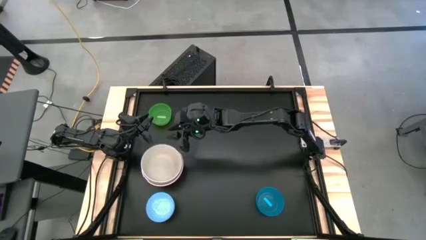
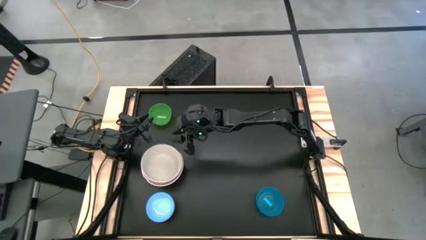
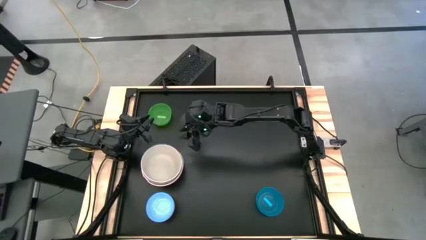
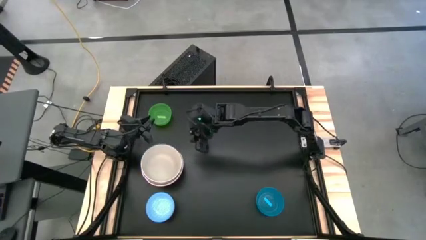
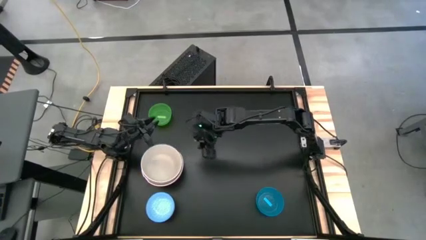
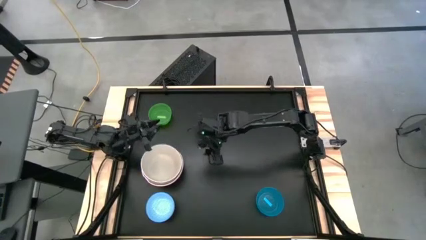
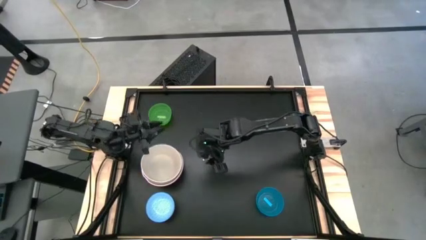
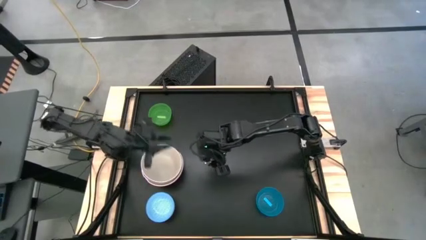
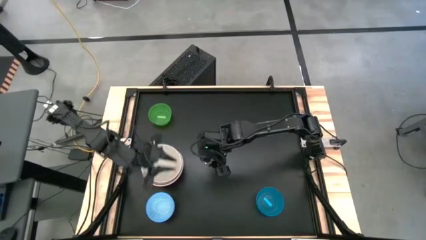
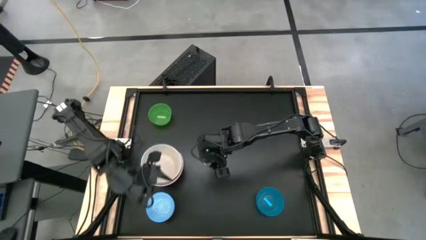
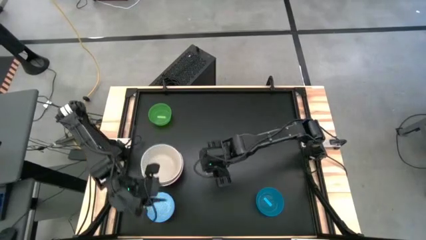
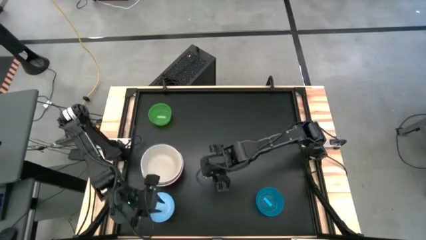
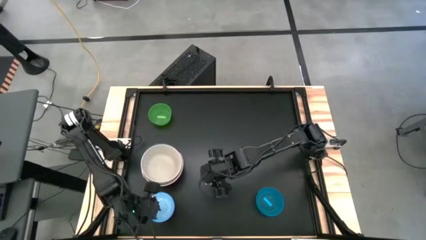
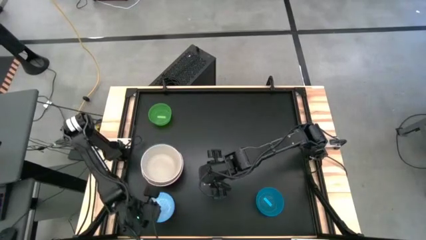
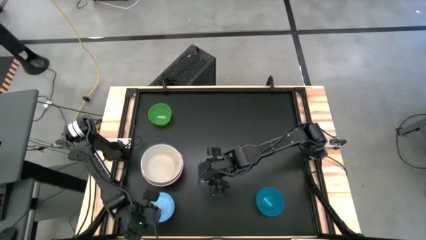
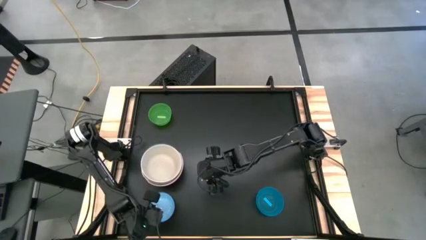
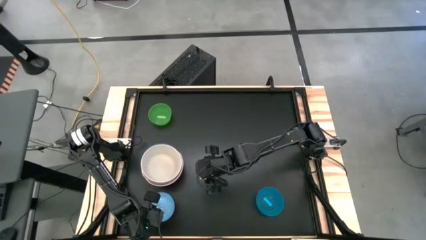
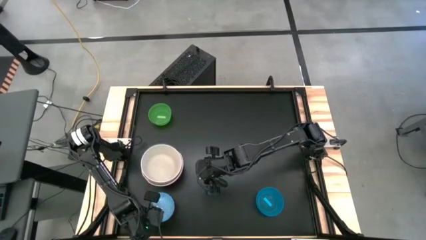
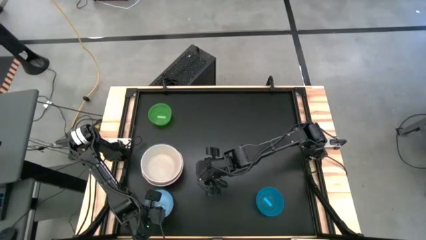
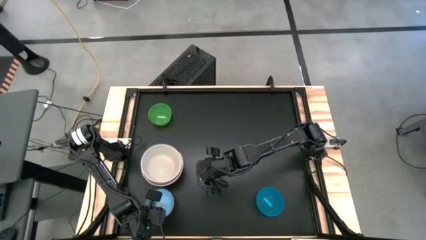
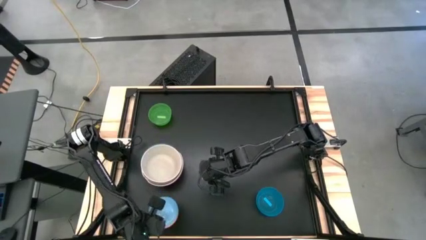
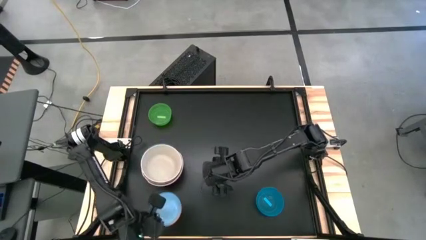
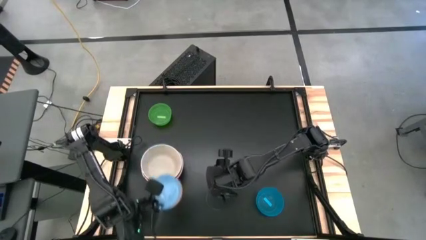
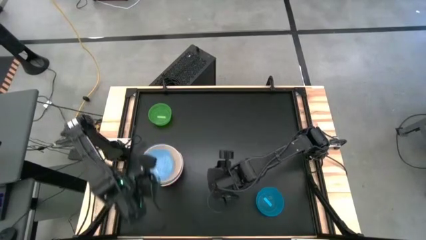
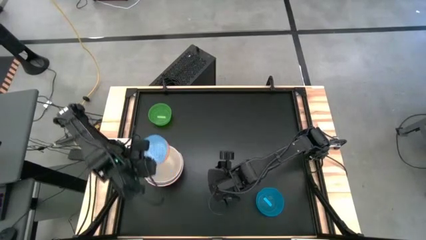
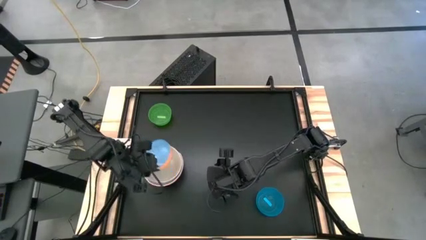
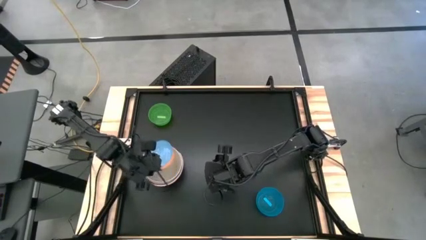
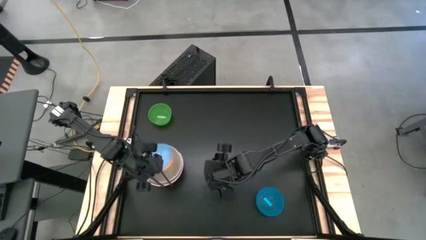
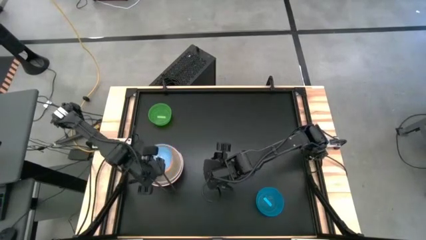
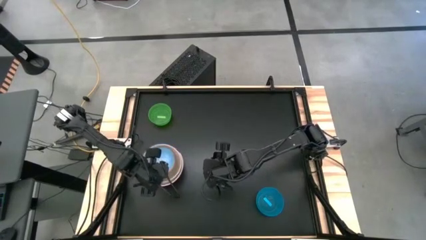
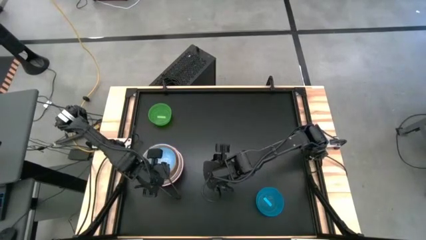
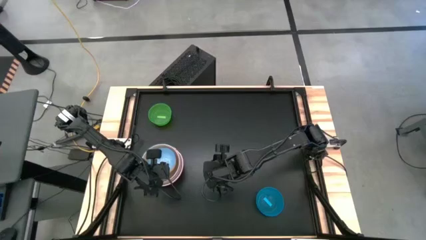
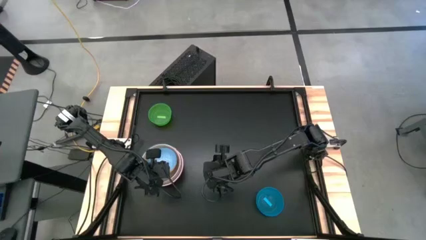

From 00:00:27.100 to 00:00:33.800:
Stack the blue patterned on top of the gray bowl

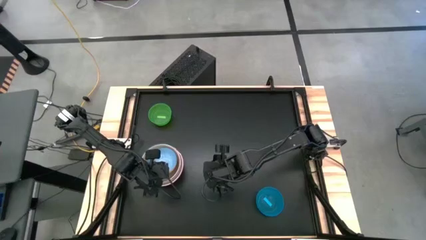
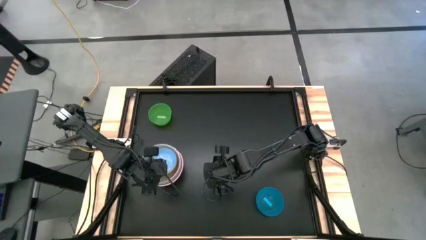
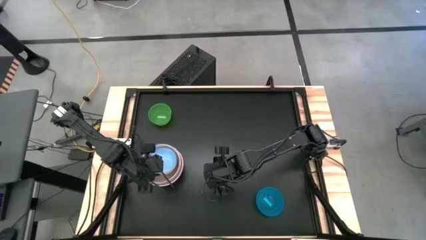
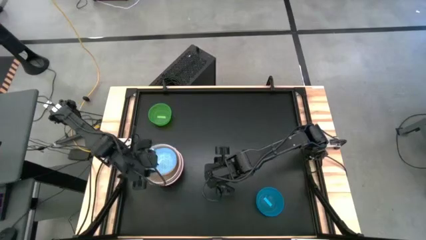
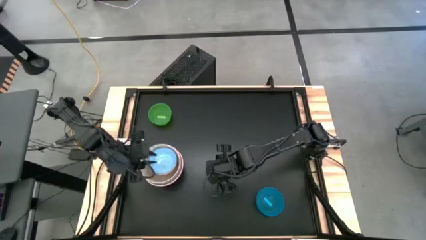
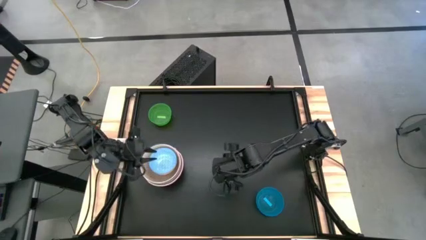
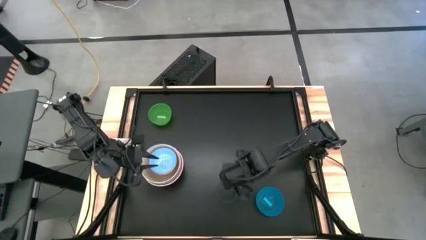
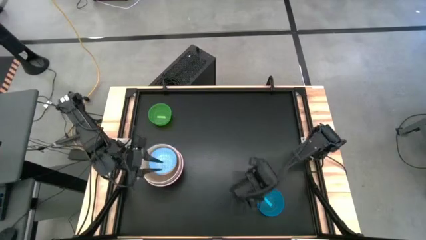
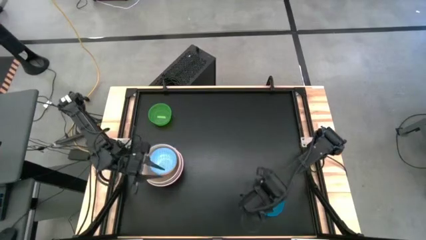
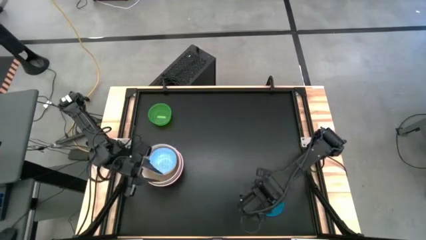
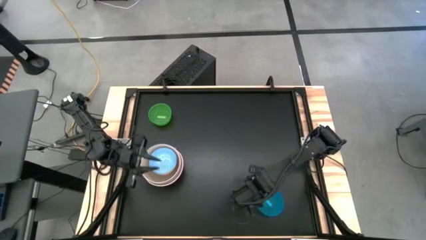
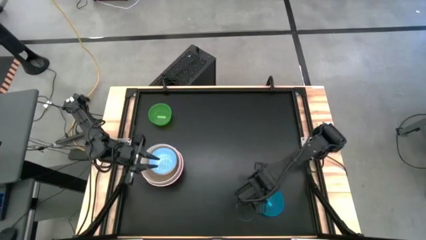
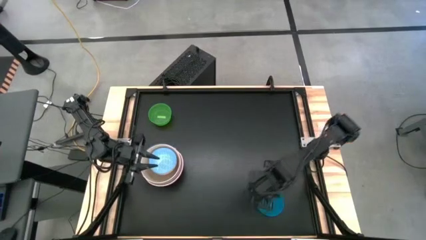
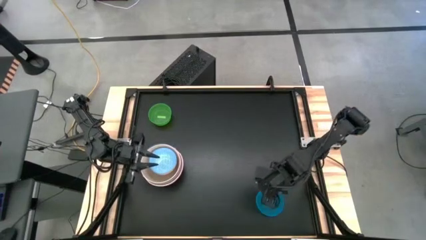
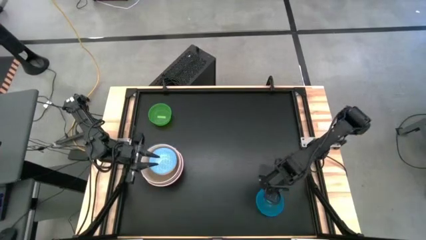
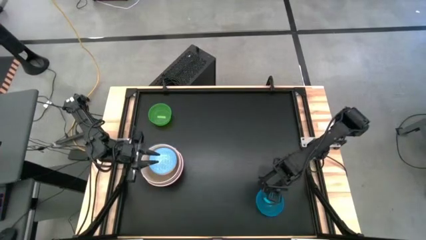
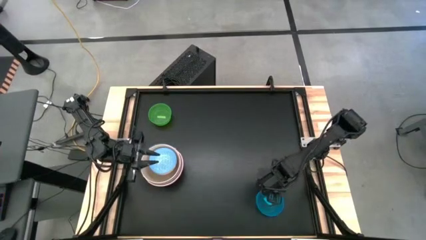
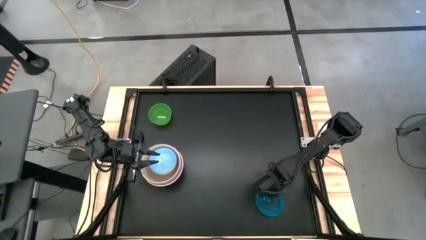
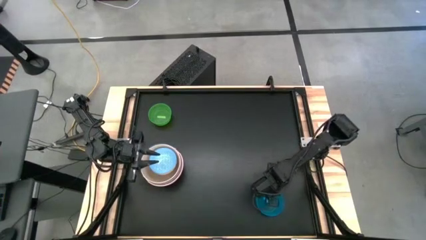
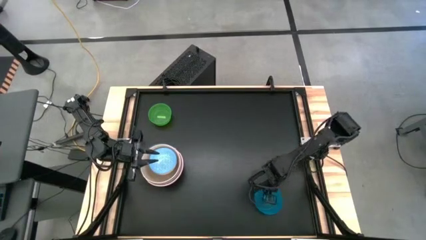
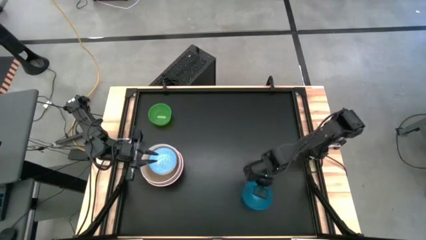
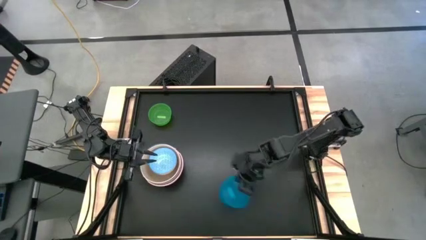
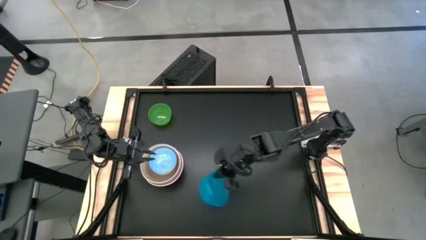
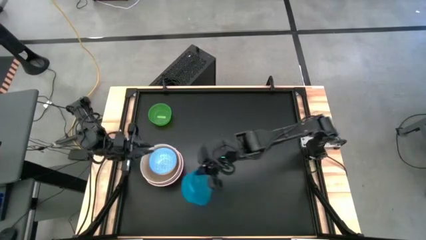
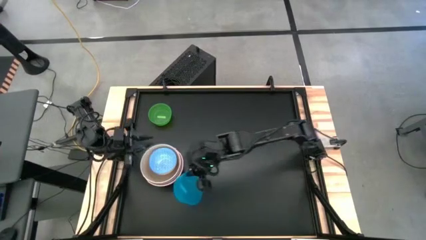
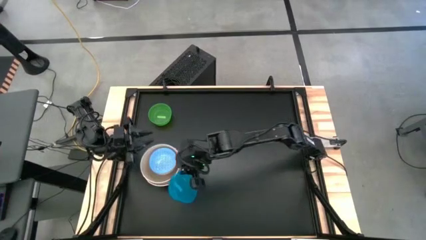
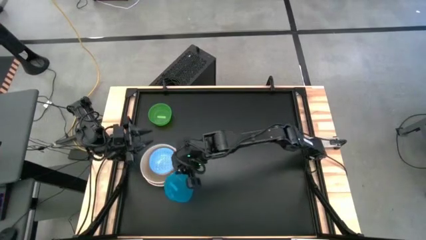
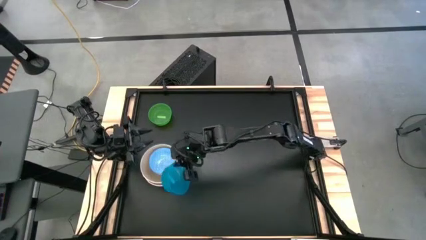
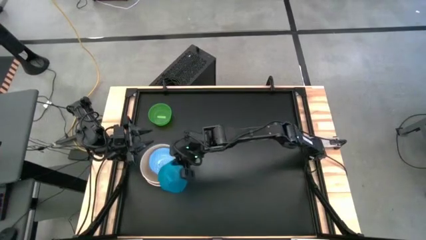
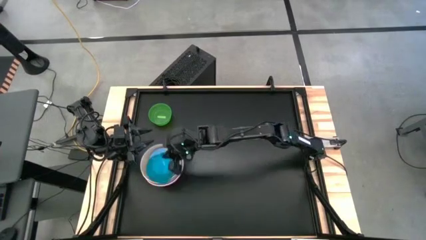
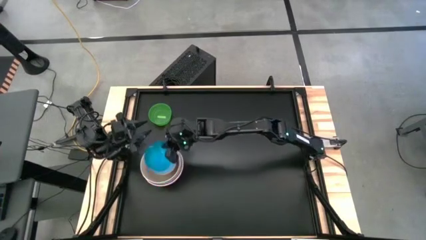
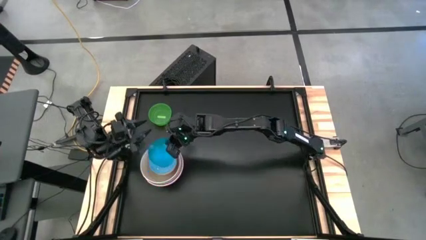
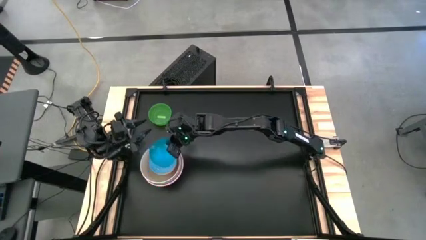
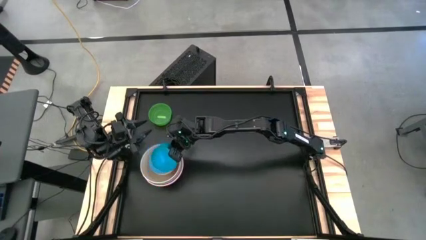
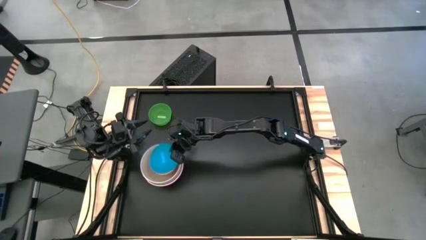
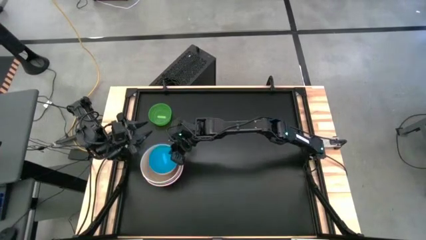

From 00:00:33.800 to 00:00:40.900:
Stack the blue plastic blue on top of the blue patterned bowl

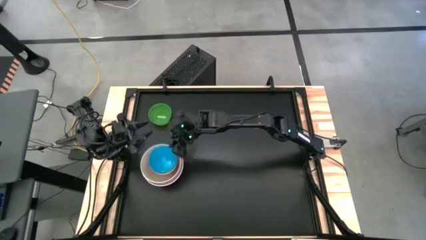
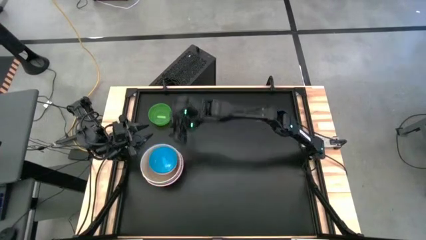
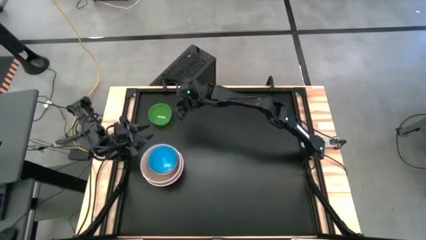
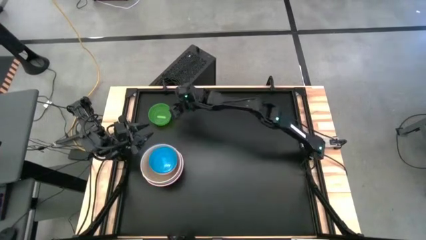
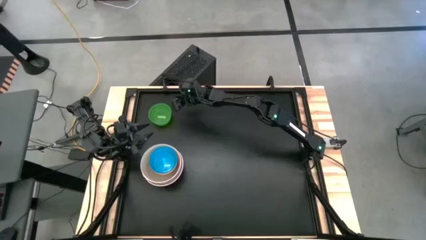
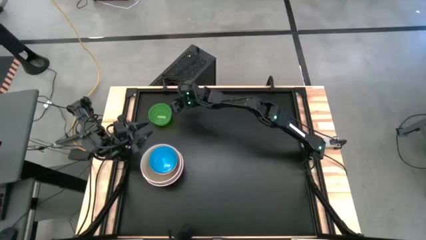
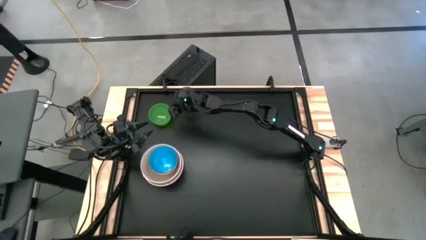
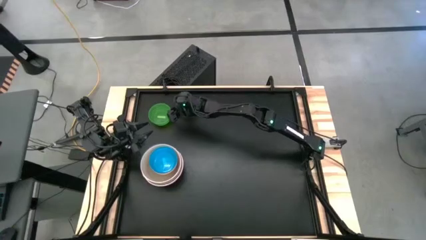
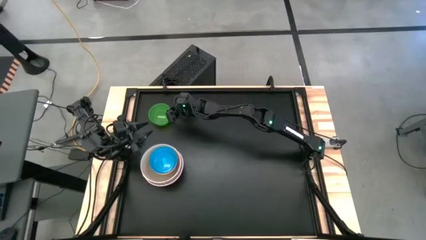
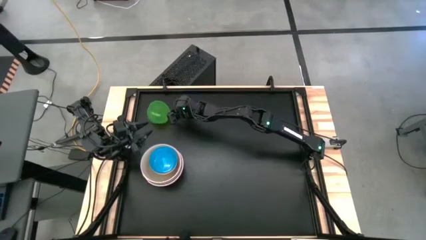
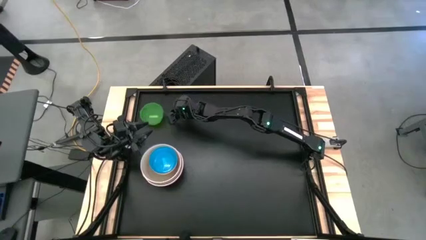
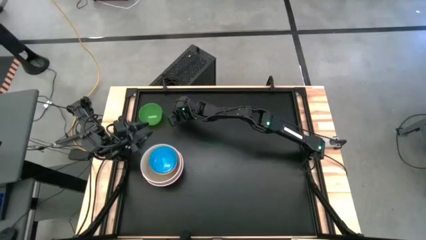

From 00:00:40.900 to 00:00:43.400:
Stack the green bowl on top of the blue bowl
